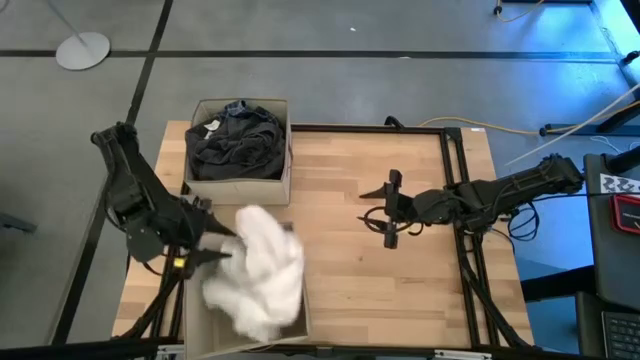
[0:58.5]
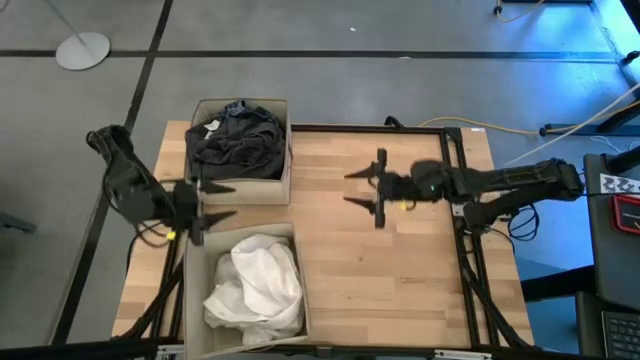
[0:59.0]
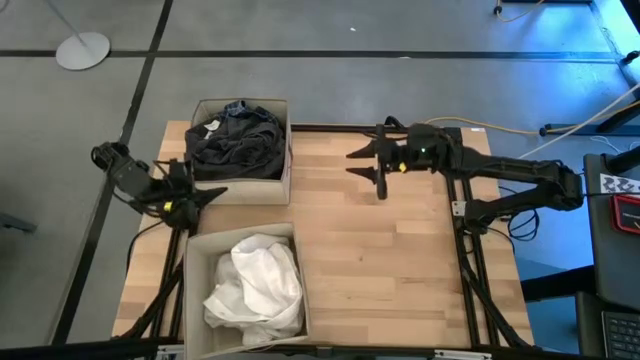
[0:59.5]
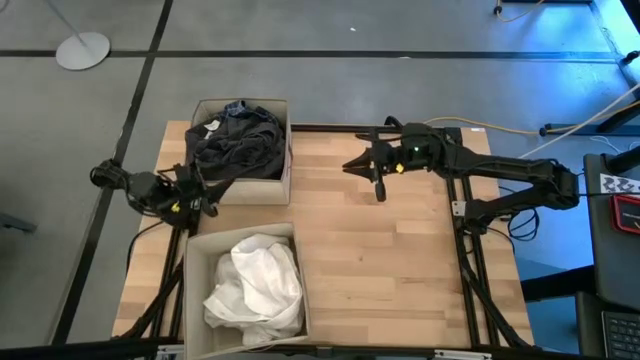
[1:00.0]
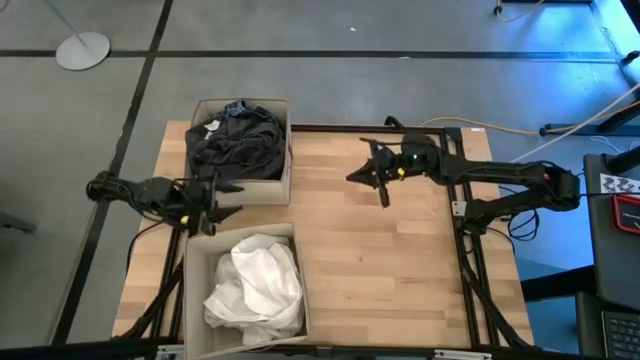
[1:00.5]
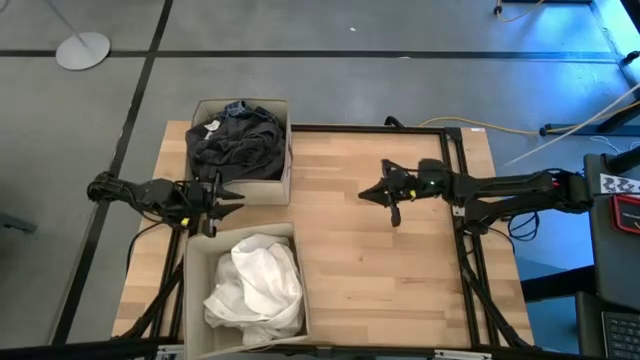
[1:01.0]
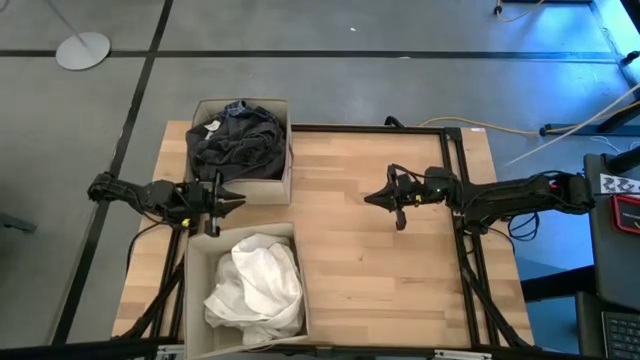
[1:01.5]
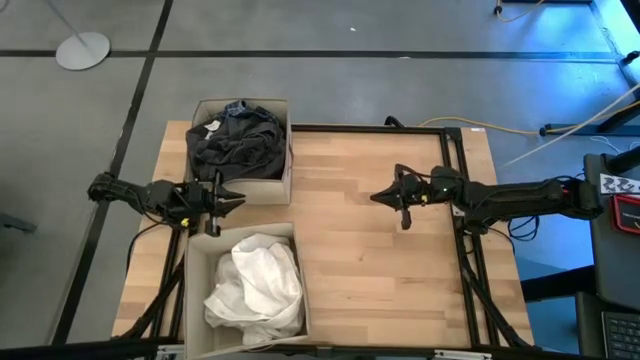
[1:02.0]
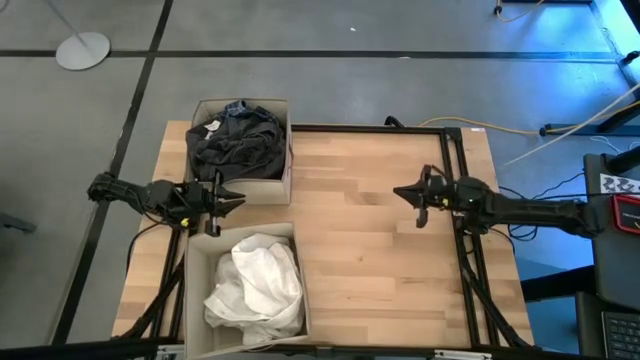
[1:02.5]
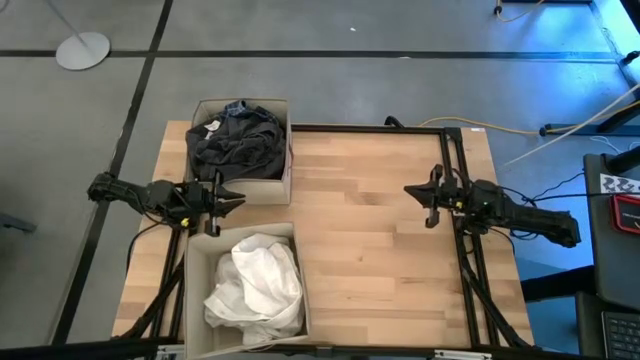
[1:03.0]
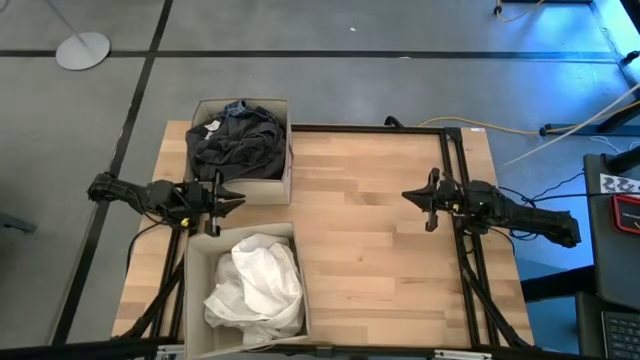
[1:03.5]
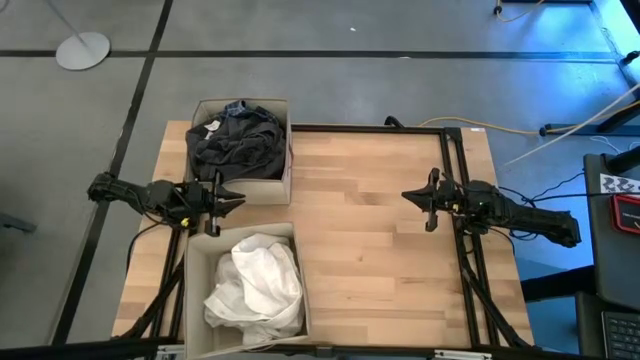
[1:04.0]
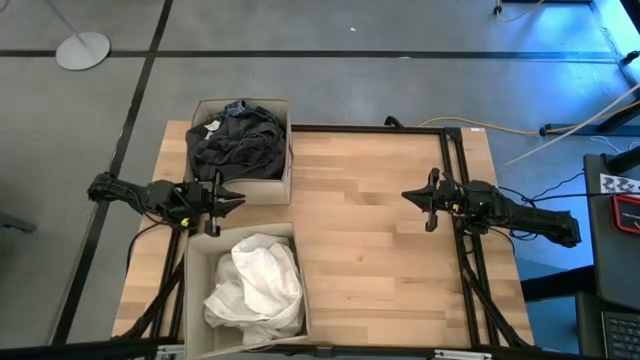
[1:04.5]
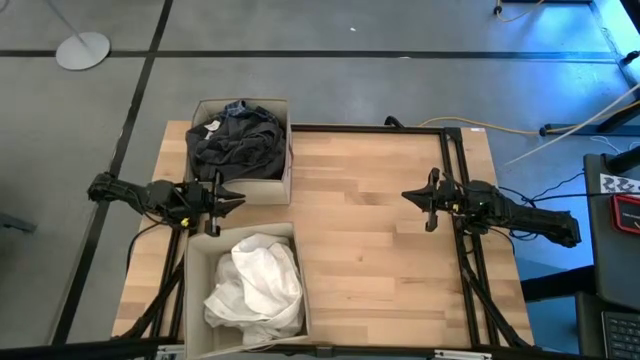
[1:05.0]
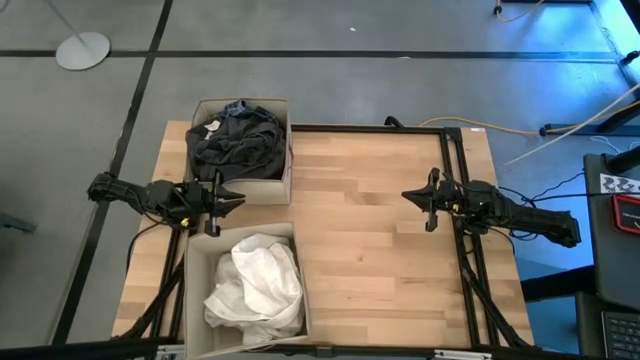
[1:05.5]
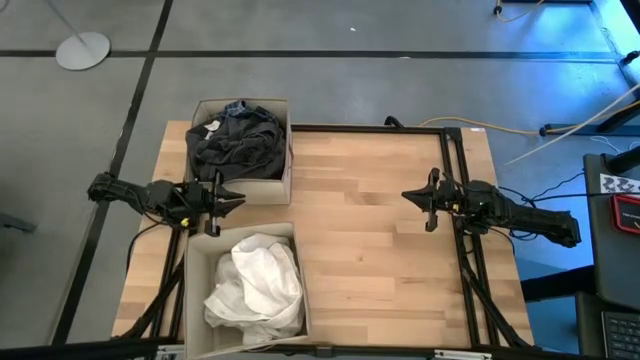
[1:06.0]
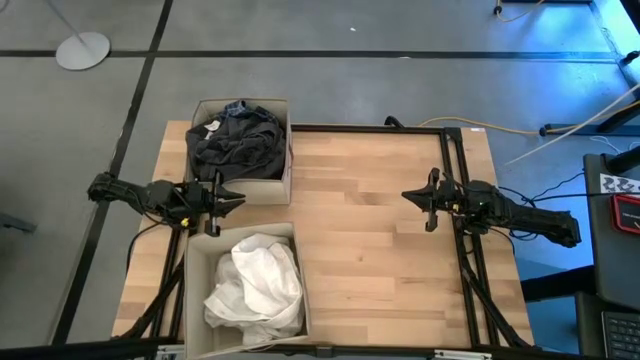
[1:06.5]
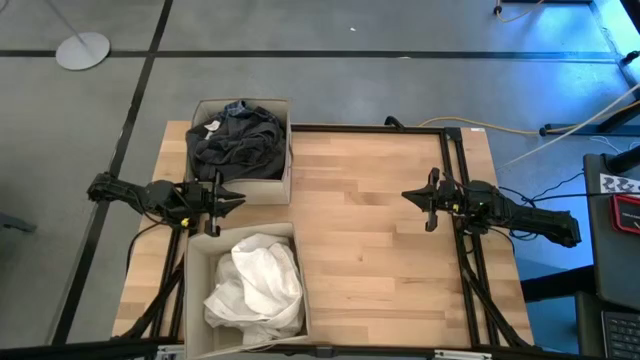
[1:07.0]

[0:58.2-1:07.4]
Task: Sort clothes
Return to home position

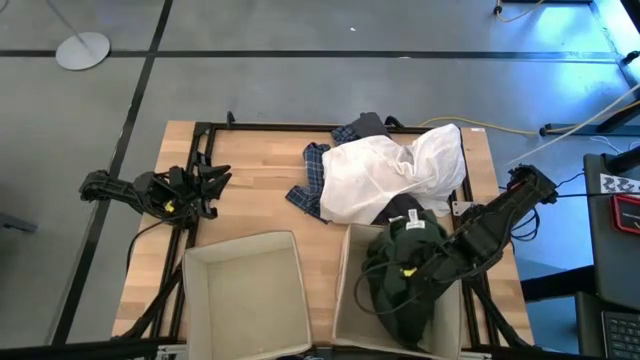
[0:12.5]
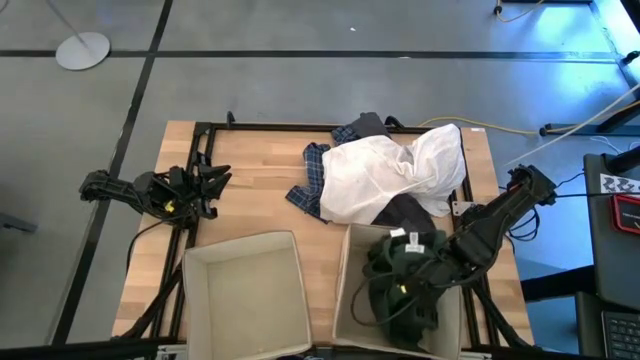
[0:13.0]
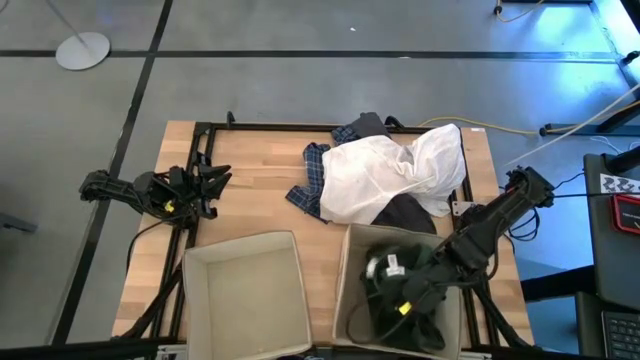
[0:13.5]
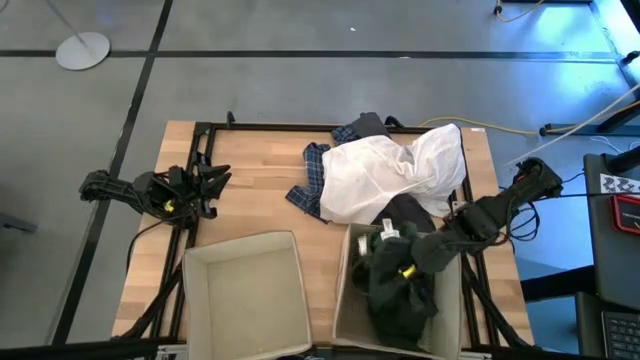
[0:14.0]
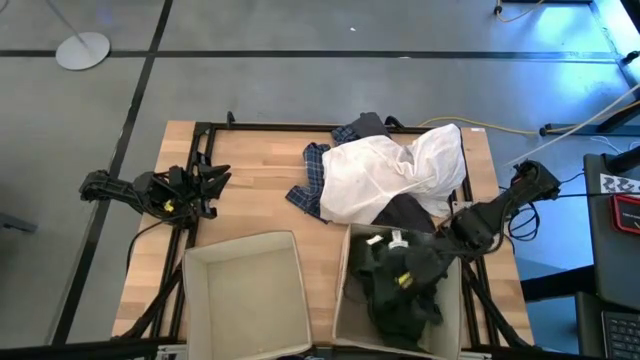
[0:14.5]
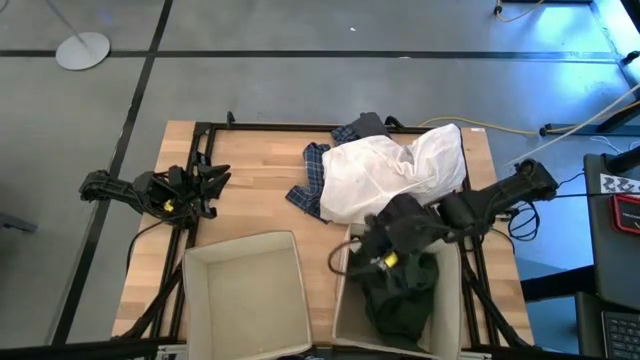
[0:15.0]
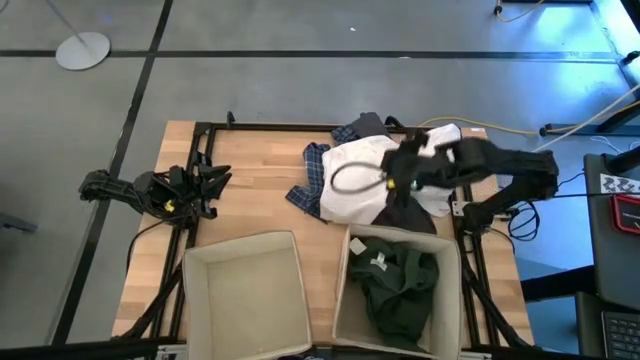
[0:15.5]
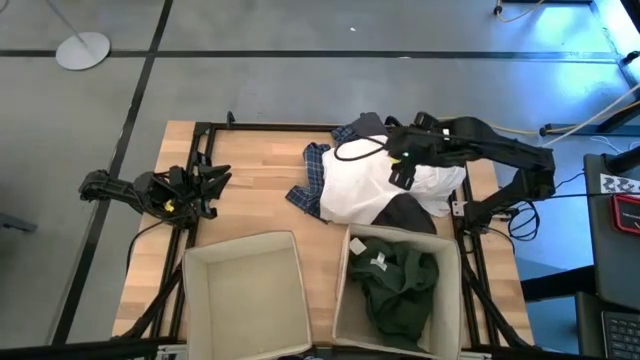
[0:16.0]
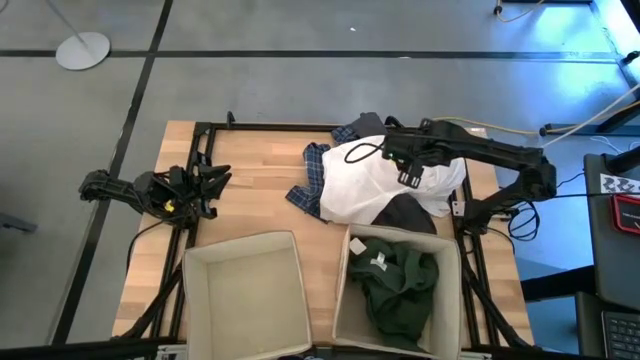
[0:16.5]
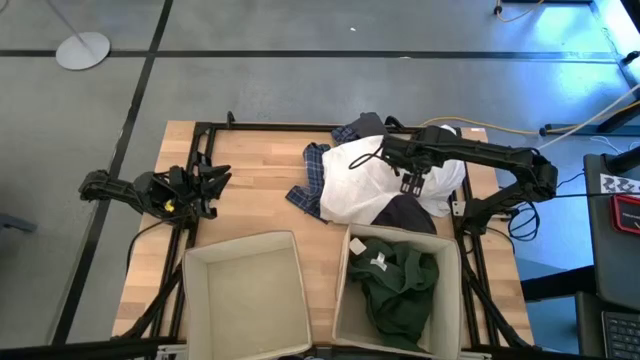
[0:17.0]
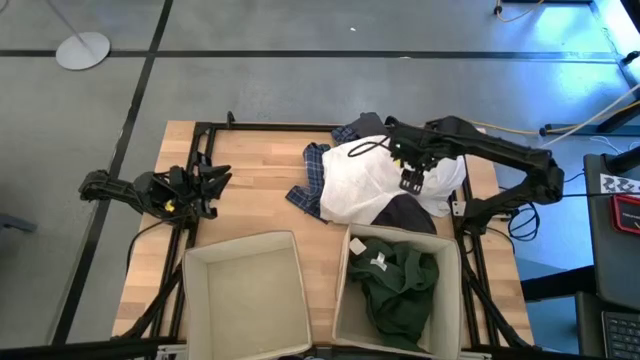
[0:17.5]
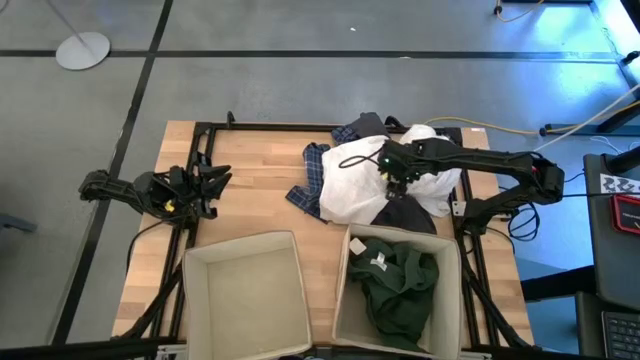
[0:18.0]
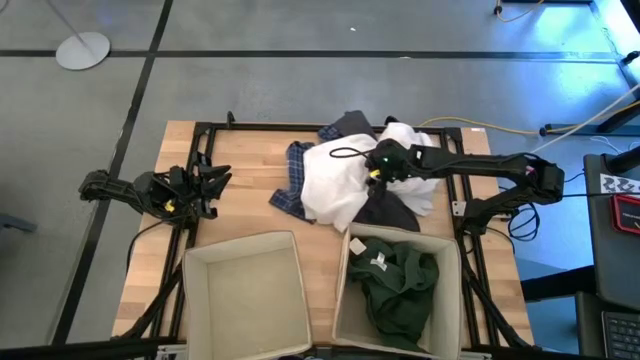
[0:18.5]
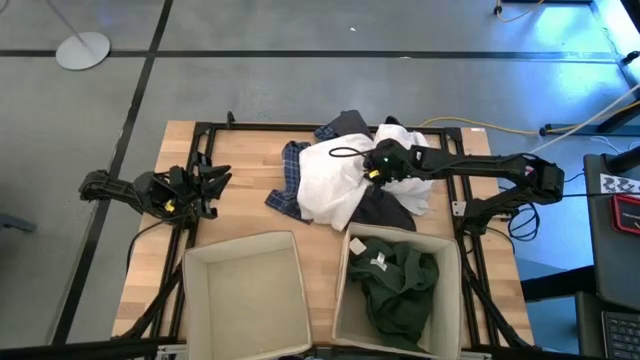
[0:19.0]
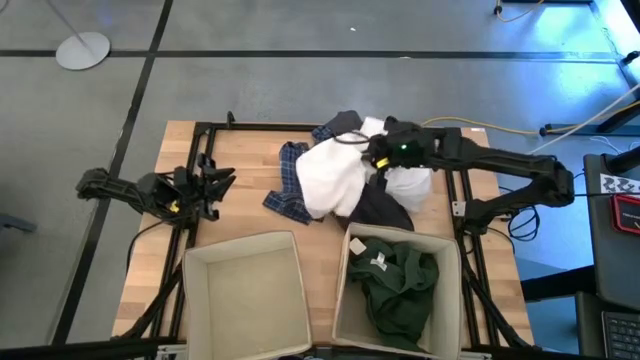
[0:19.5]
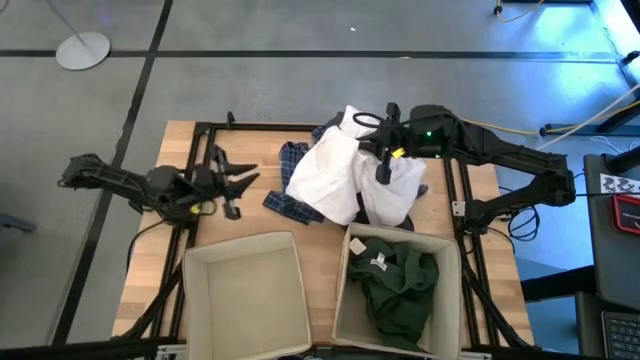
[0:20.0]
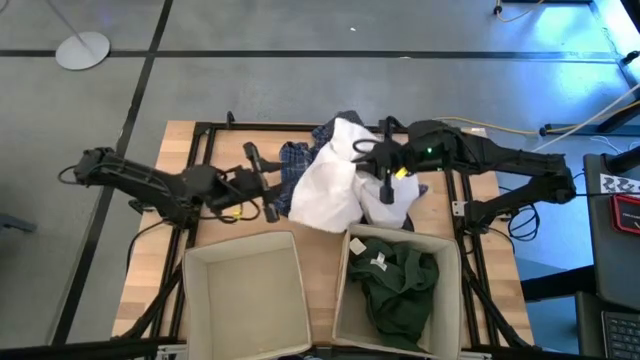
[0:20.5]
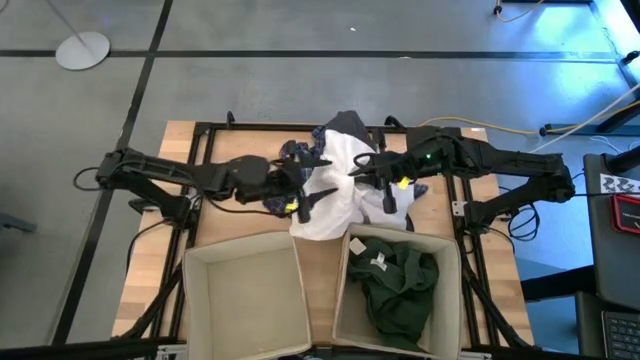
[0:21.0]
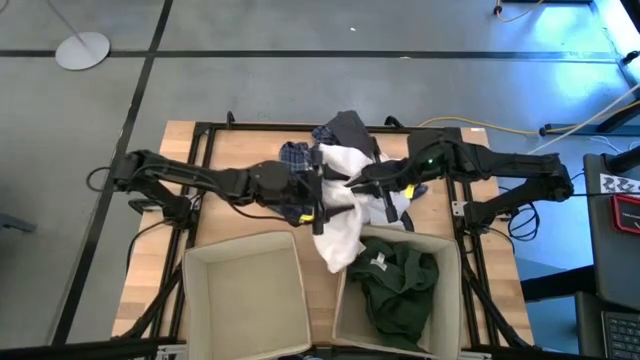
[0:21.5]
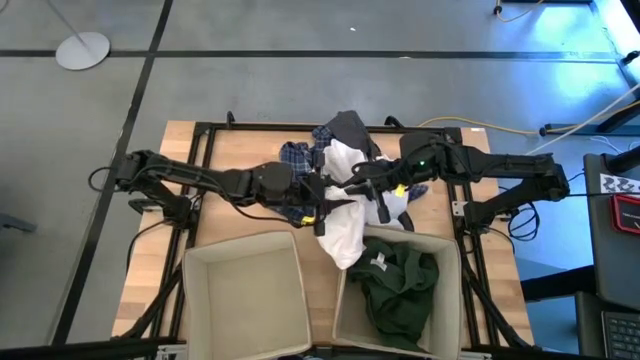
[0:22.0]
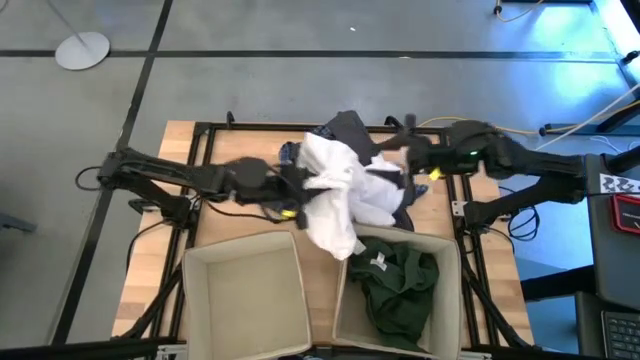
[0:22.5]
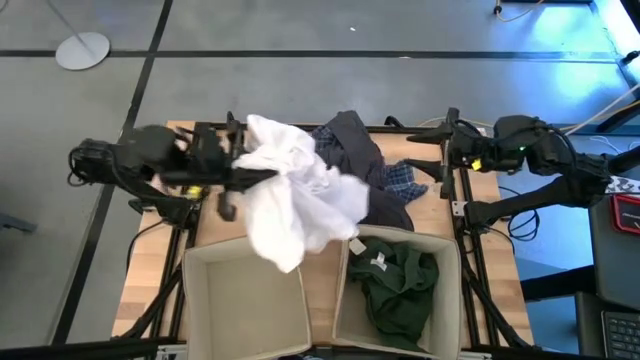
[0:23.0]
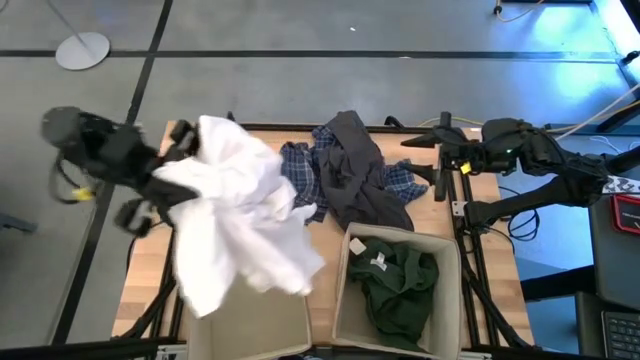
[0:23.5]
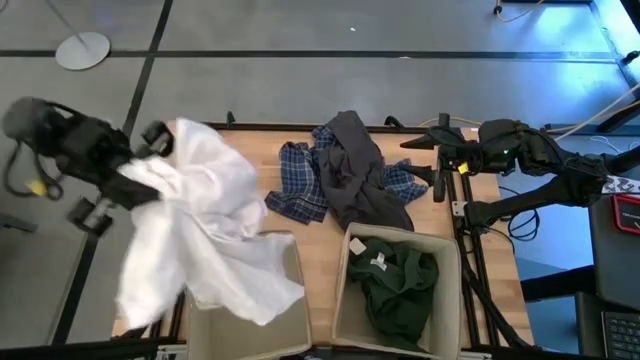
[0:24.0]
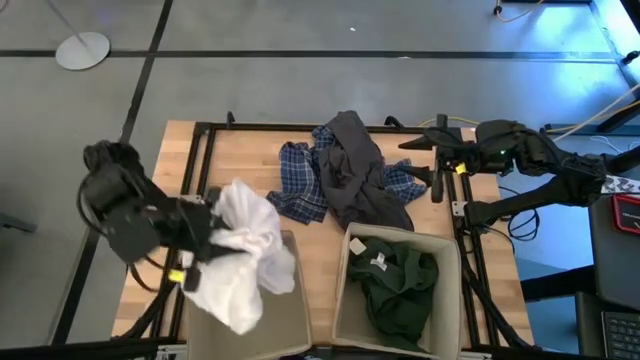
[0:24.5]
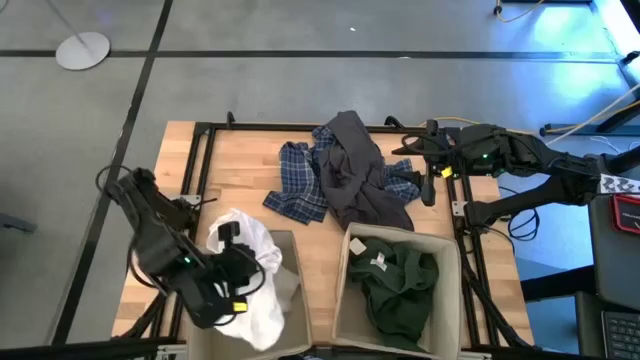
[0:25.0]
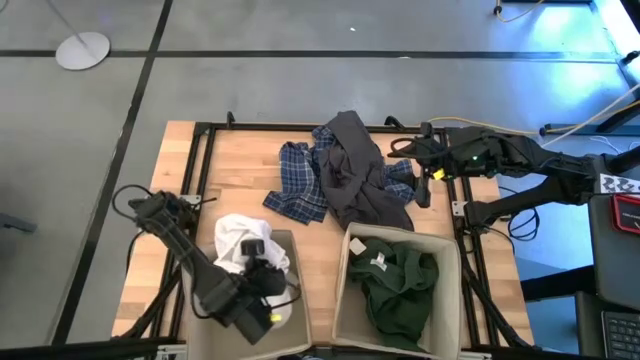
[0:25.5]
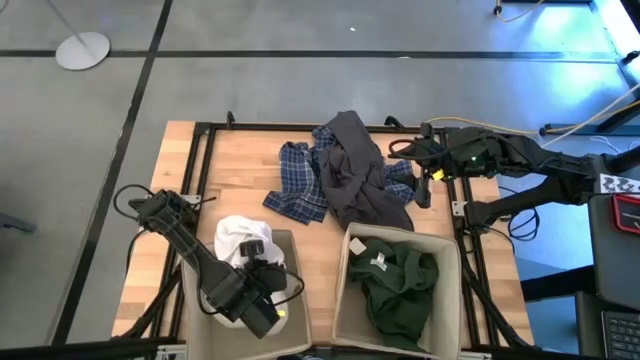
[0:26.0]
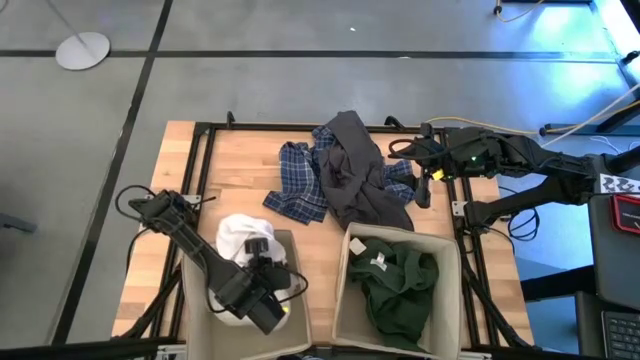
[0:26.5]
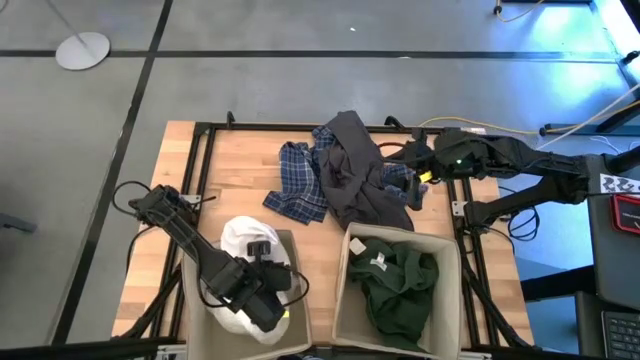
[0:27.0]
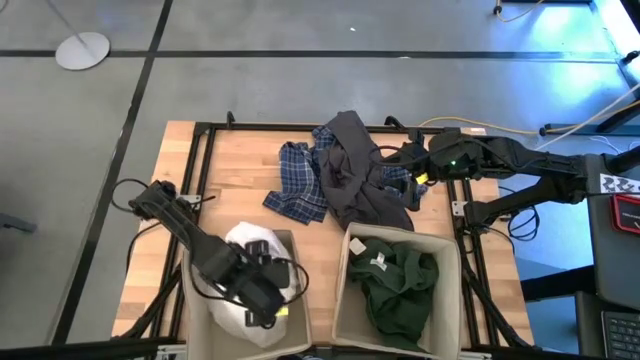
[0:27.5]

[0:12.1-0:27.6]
Task: Sort clothes
Put the white shirt into the left laundry organizer
